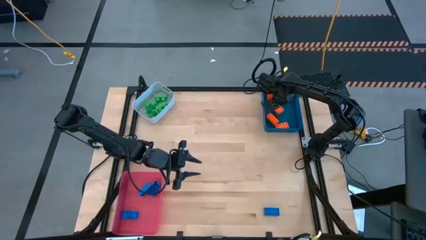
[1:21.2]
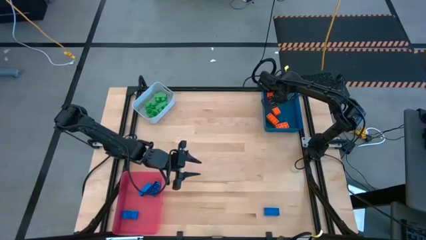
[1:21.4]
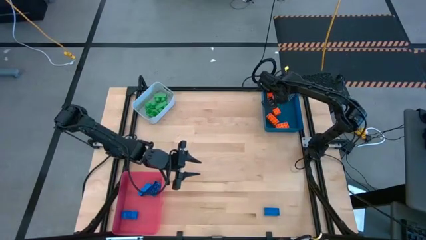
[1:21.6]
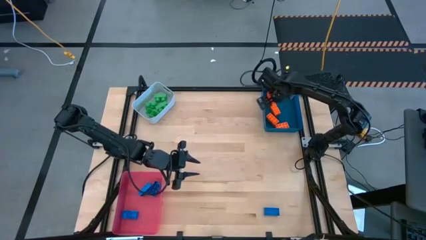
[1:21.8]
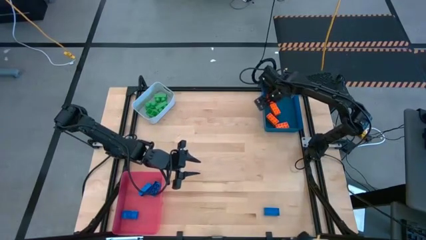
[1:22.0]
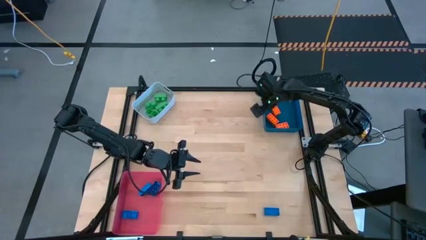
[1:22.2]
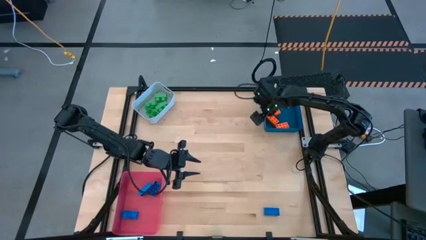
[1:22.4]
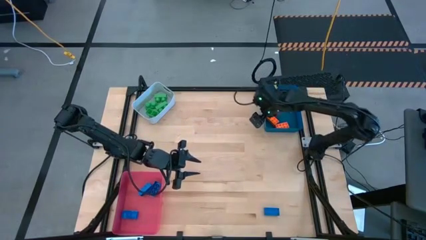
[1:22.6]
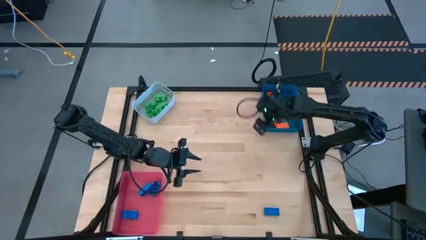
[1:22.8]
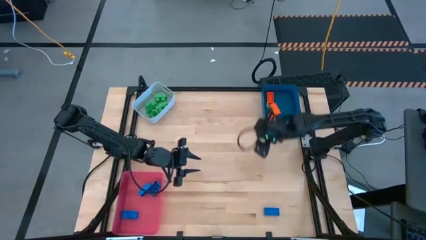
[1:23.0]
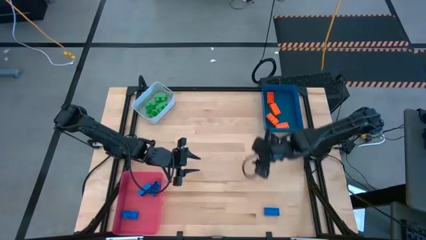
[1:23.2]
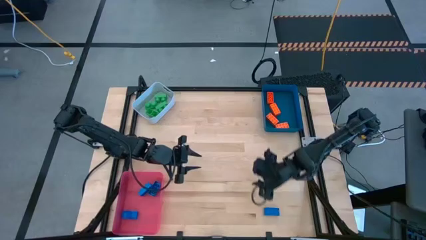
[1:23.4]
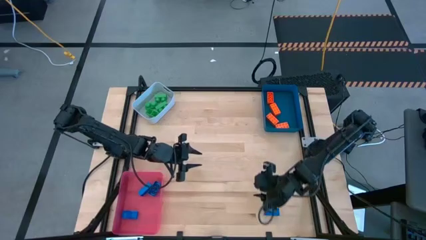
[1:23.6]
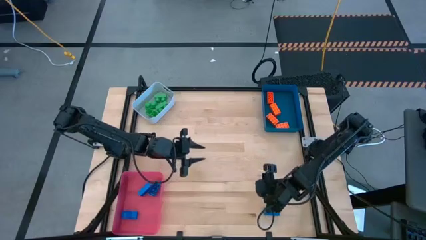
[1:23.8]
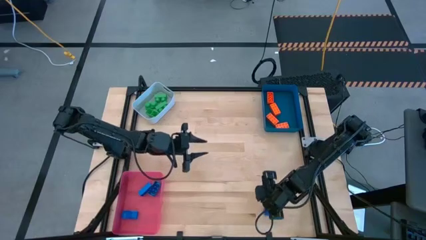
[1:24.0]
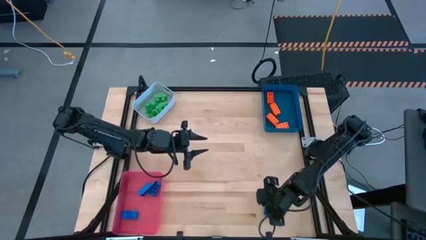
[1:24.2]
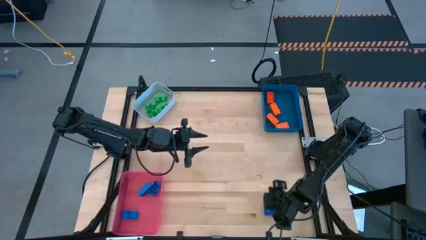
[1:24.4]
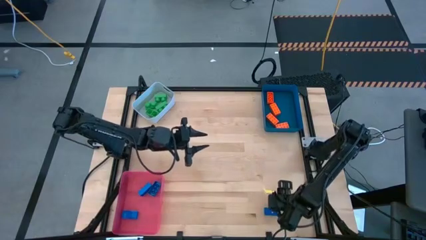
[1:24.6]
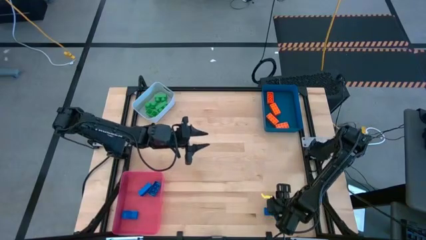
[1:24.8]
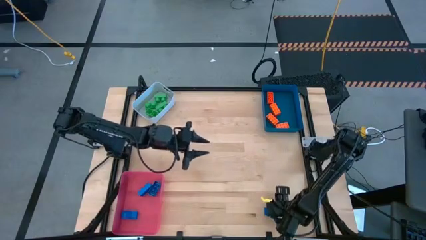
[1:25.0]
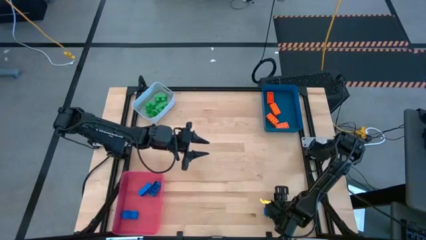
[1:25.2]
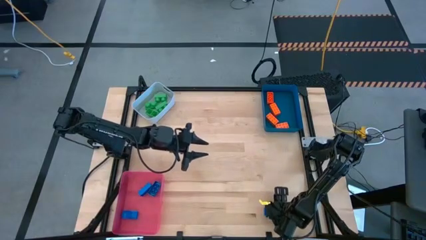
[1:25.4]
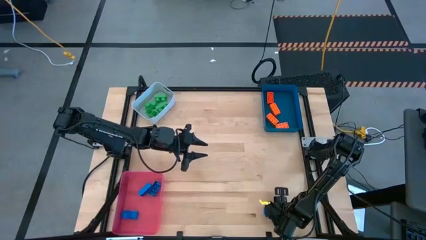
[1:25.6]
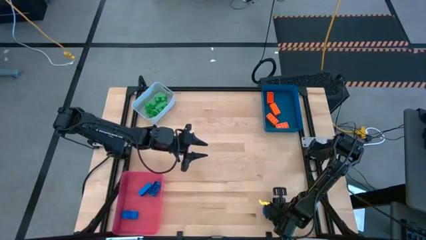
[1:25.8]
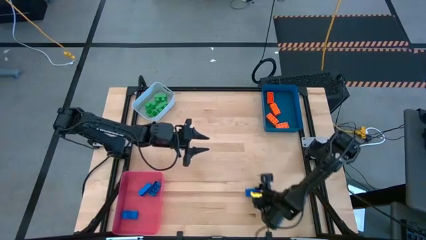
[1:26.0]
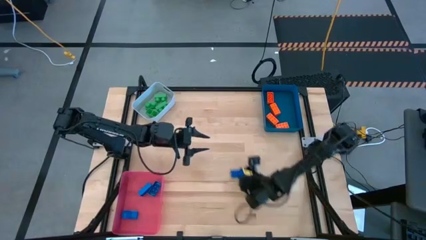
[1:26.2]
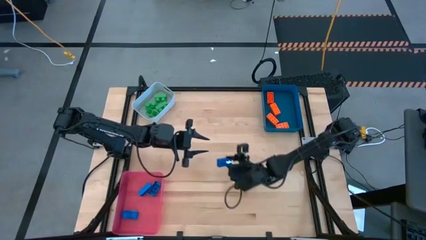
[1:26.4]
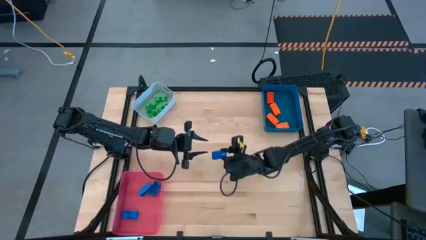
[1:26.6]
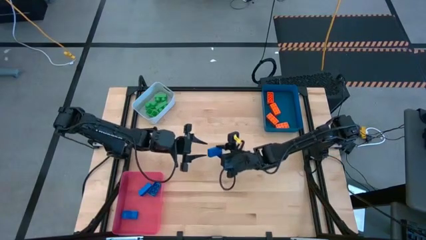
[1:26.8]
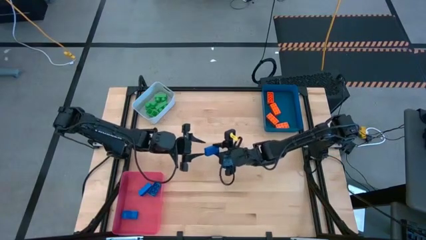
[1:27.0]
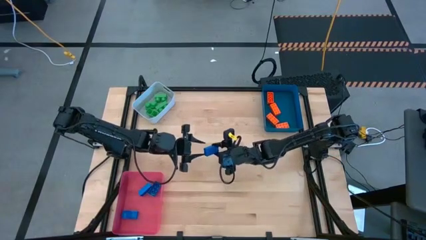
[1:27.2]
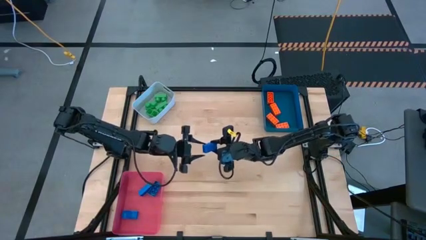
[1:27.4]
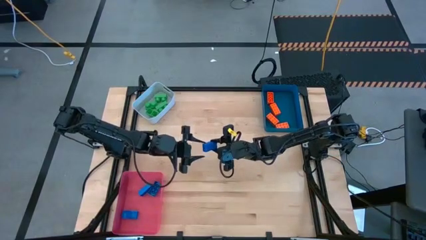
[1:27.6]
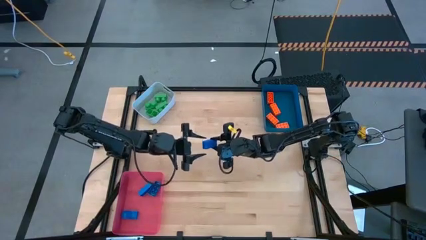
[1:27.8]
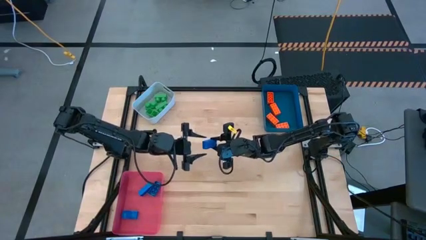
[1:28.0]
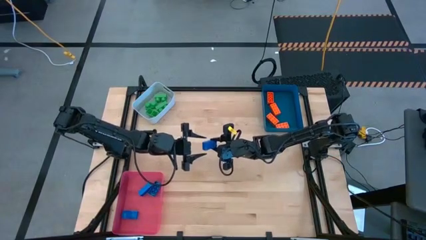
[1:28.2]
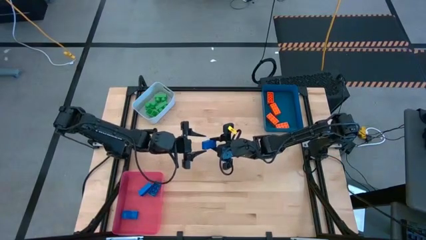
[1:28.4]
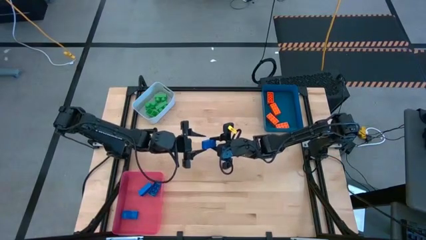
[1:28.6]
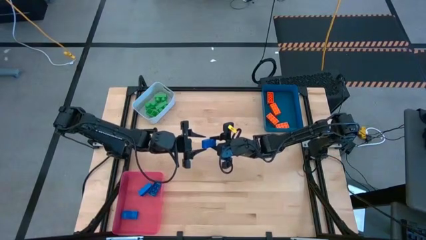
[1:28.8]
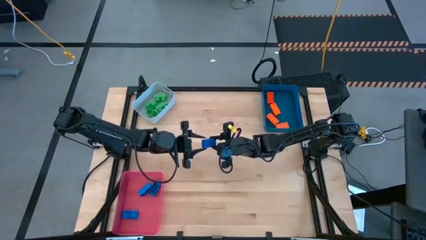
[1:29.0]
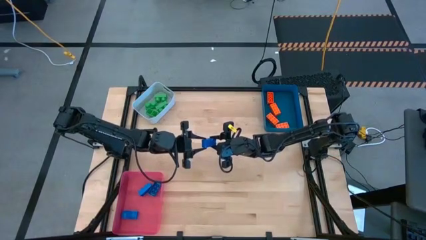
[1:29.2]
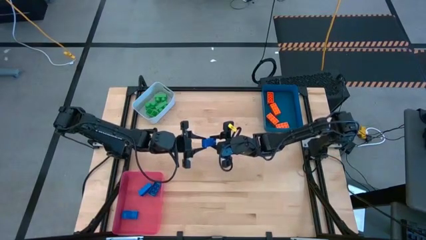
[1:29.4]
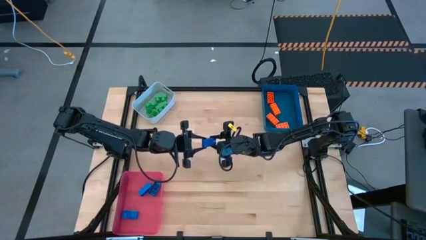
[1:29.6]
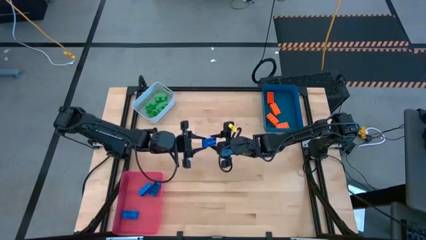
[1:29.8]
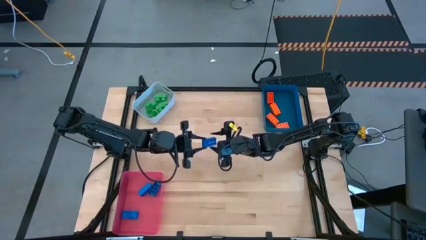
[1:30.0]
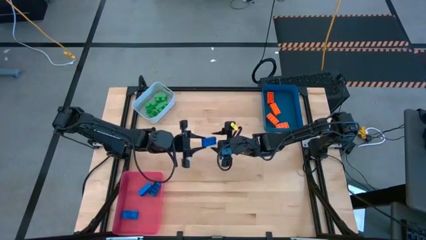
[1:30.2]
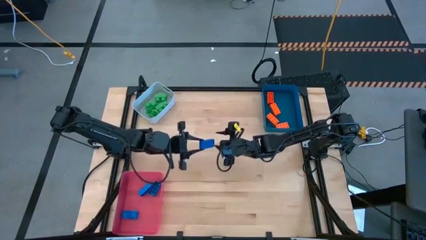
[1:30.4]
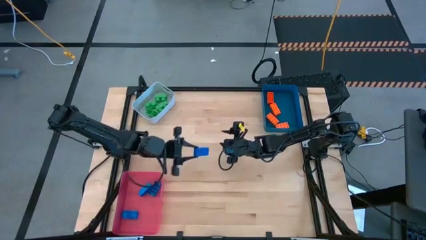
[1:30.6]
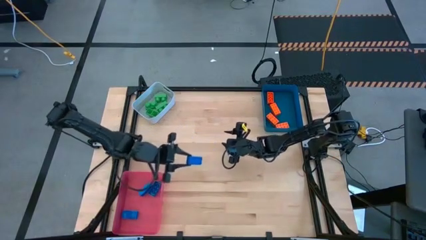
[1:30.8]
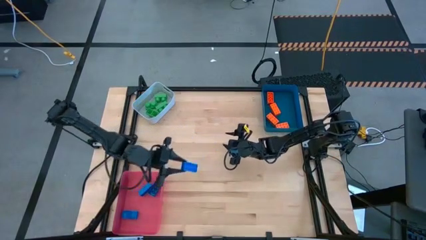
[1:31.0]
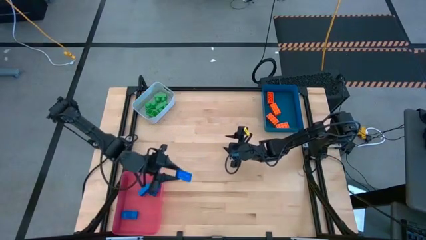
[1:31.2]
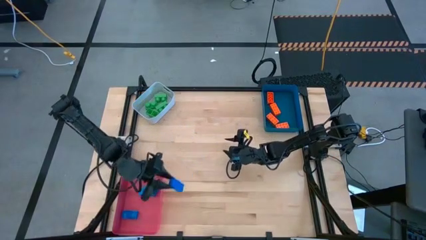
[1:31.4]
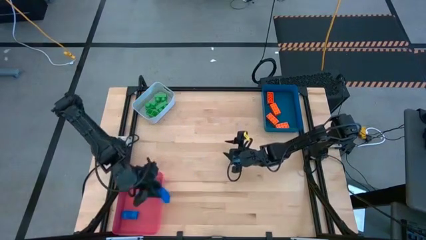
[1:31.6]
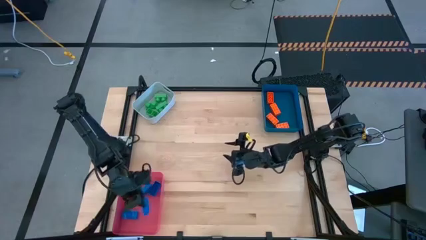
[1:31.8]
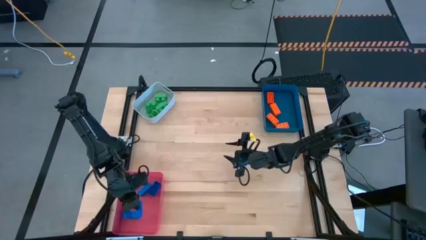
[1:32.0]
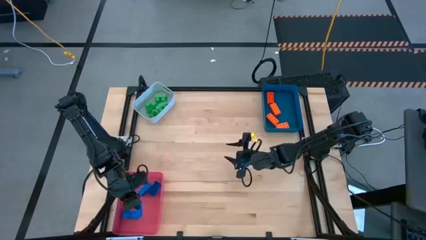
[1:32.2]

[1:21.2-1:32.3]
Task: Sort & place blocks by color
Put the blue game piece into the red bin

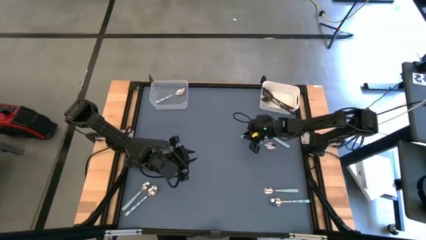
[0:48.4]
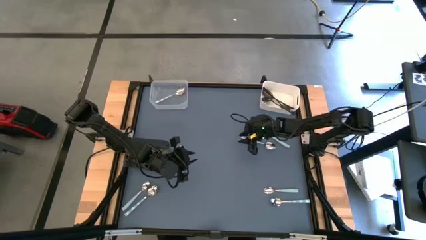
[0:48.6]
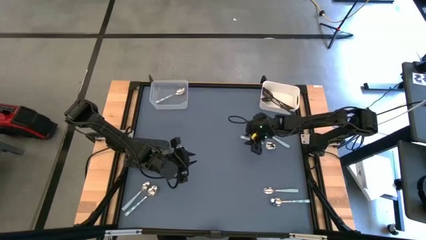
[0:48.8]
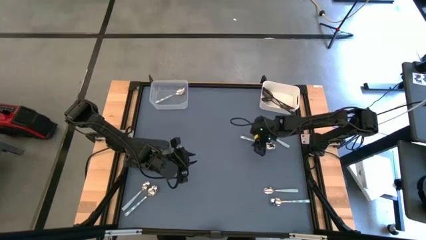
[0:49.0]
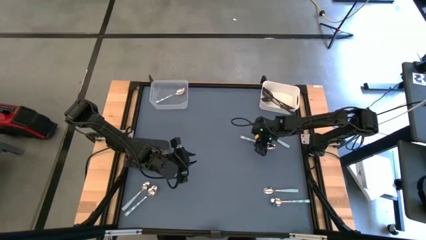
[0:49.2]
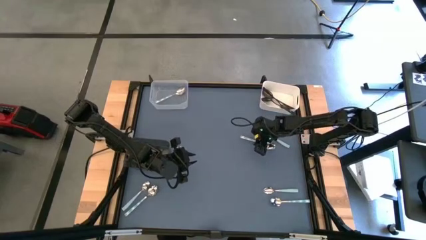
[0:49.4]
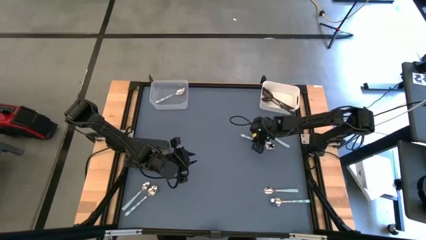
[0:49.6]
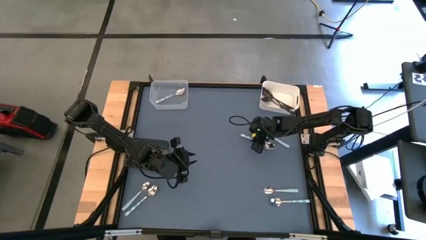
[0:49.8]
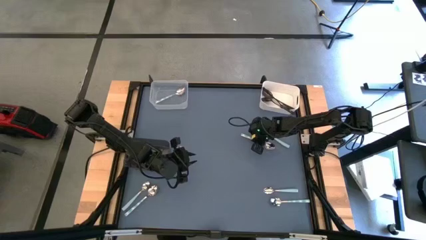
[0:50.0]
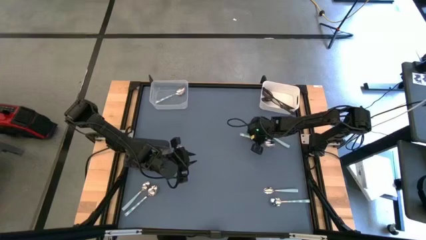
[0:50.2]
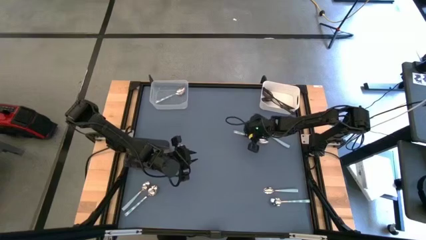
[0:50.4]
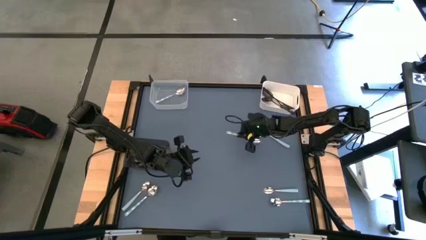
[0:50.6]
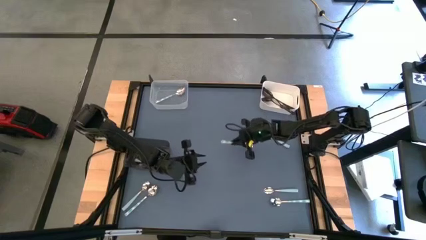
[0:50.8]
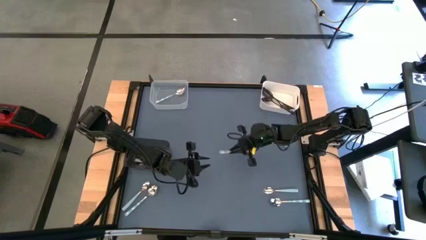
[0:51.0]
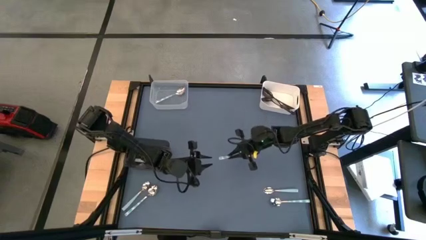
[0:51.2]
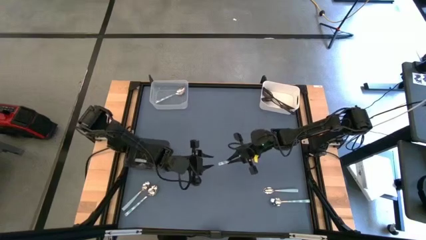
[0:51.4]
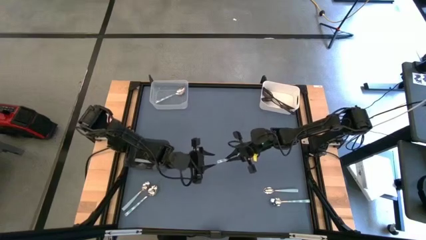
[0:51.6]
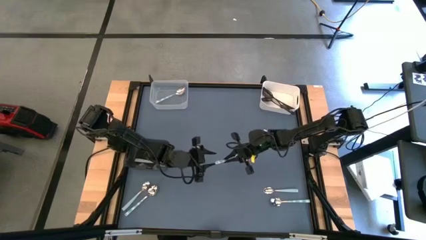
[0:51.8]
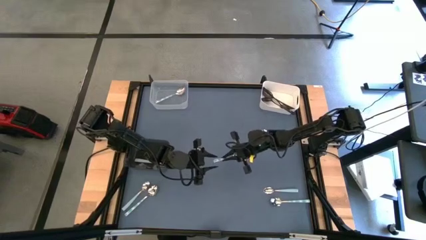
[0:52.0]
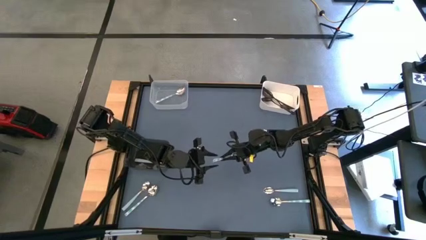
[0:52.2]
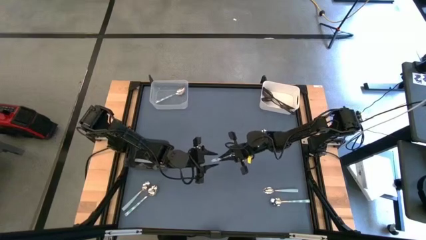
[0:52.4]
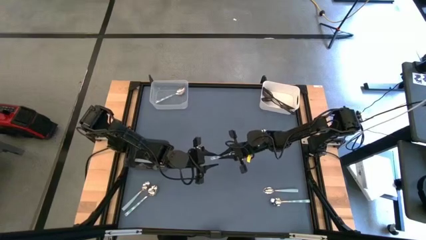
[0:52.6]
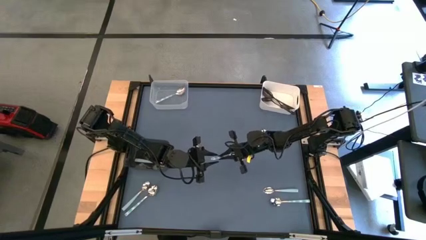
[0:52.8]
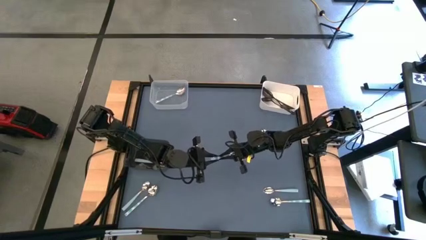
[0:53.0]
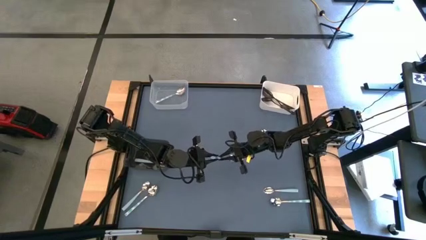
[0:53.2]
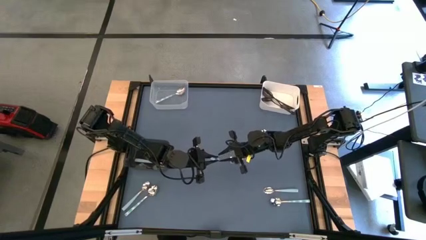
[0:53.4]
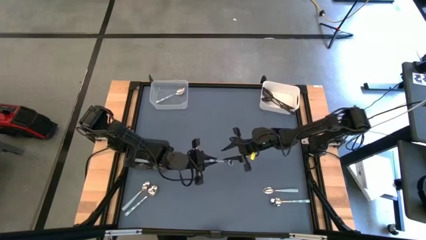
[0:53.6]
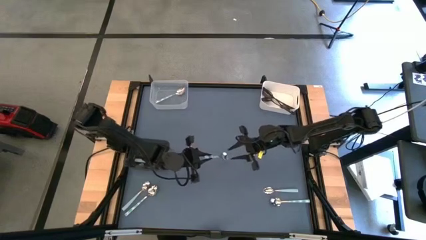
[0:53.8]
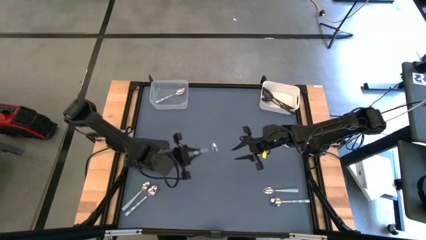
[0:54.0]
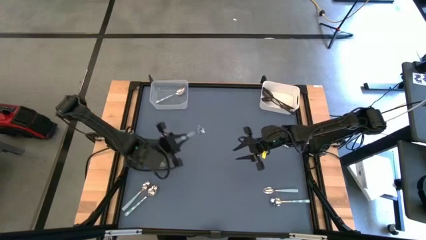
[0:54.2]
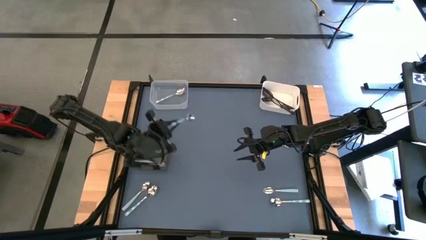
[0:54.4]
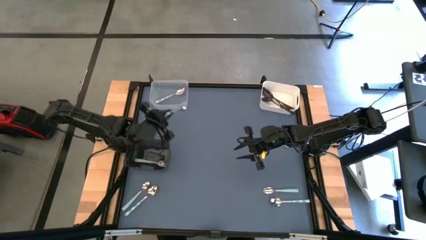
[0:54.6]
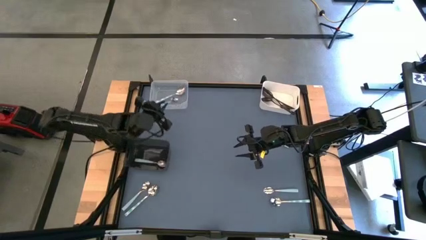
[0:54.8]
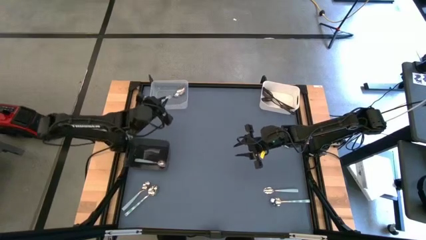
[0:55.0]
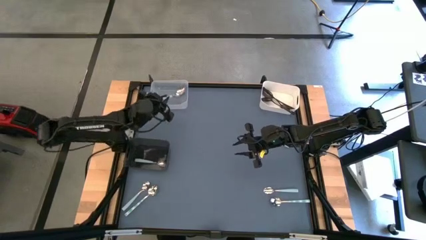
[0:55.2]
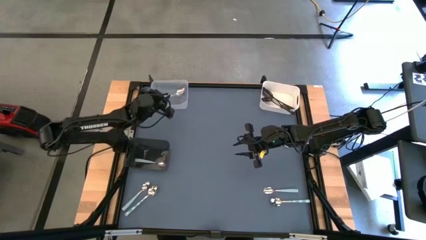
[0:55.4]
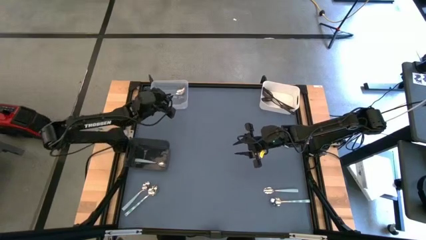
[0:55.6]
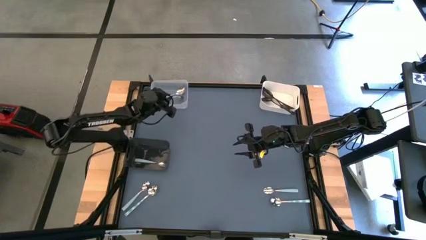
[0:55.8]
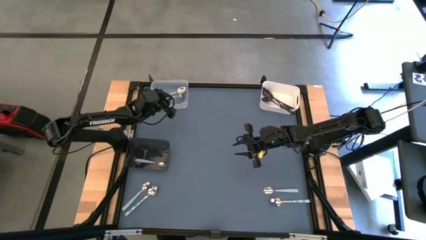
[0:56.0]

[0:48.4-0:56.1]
Task: Sort silverware by color (type)
Put the green spoon into the transparent bin
